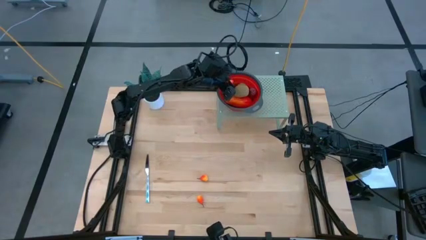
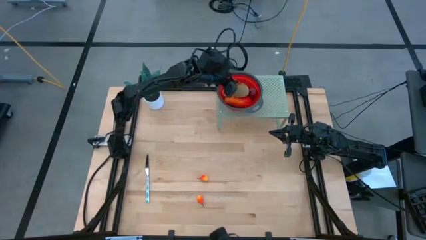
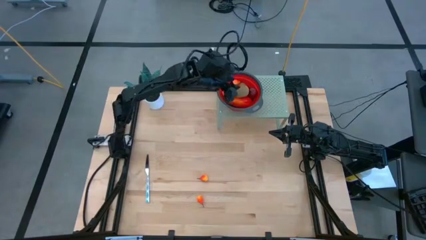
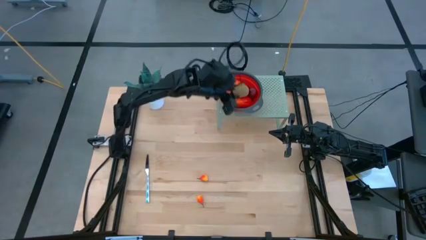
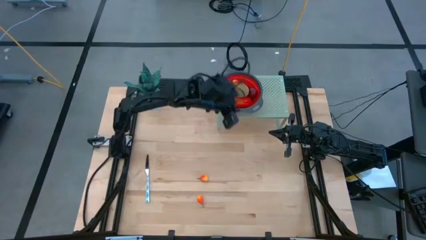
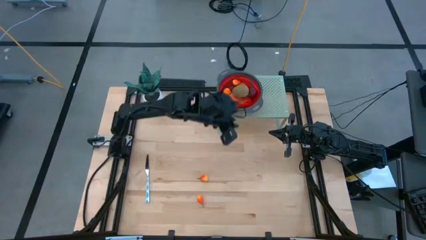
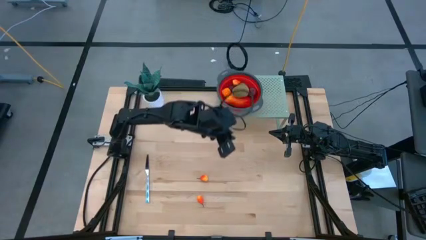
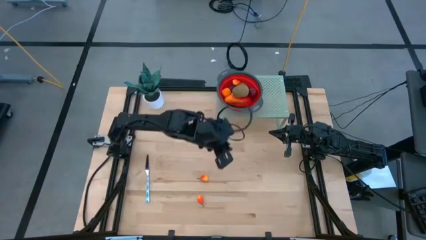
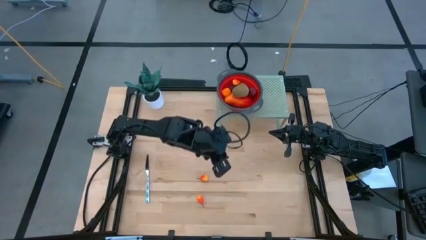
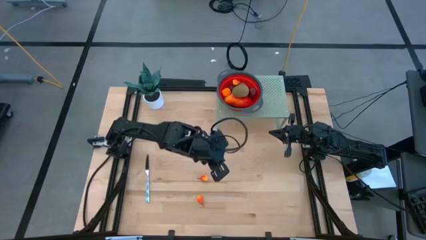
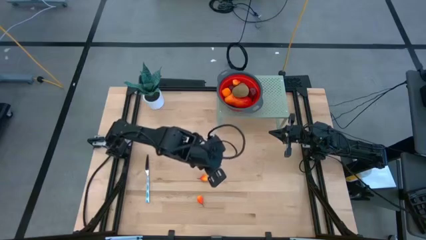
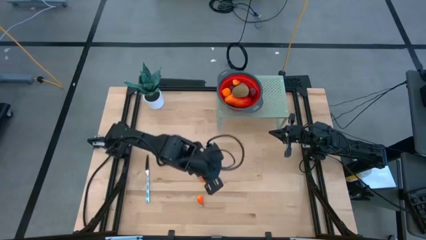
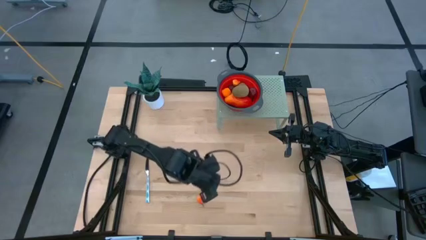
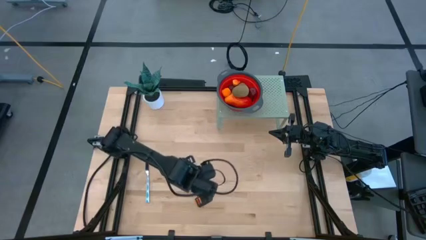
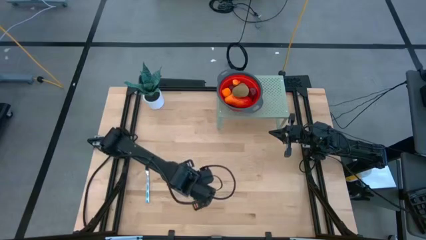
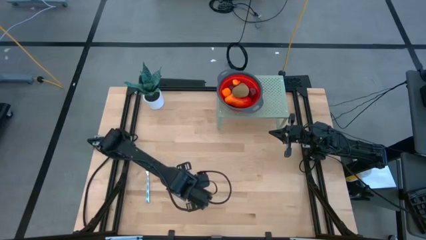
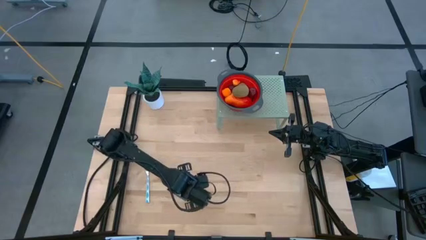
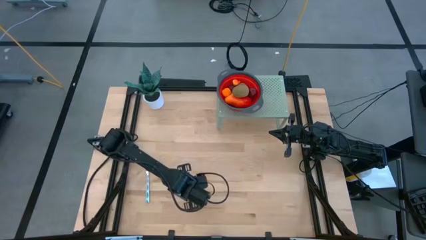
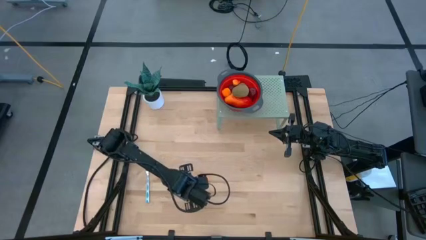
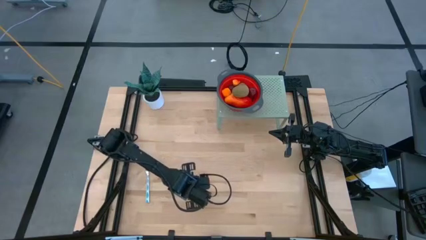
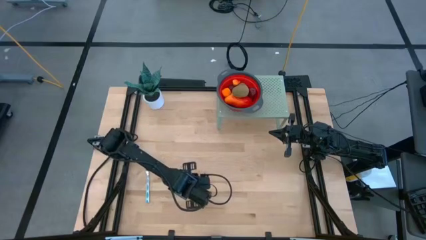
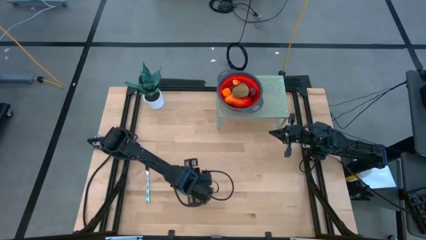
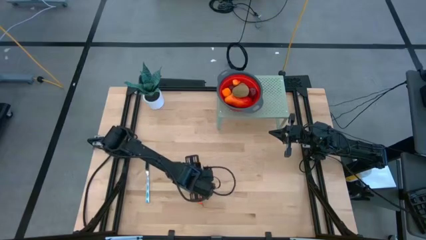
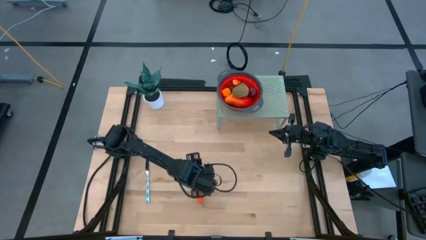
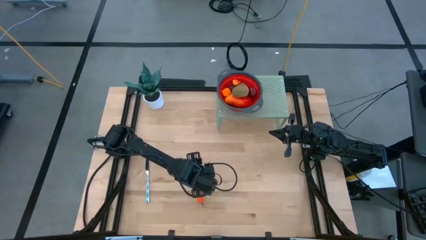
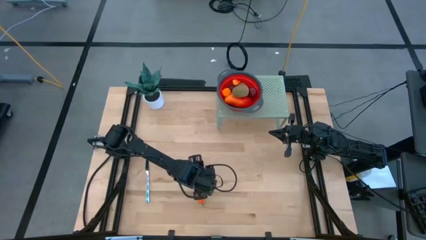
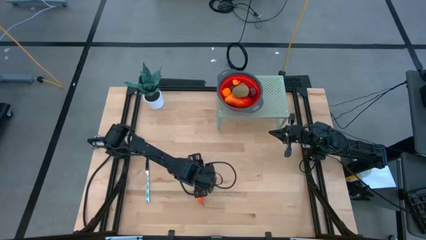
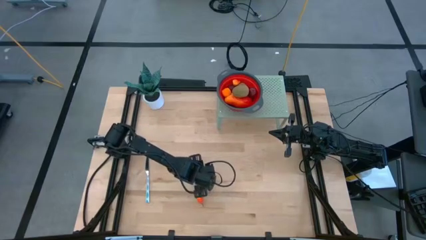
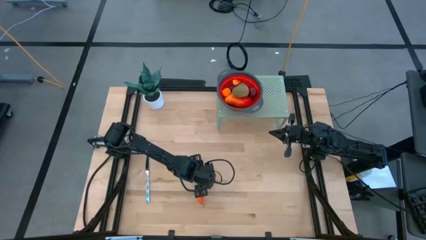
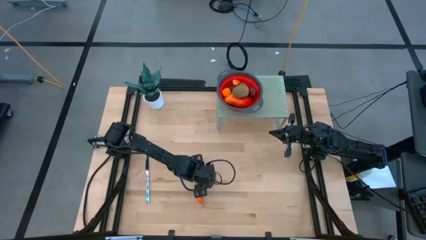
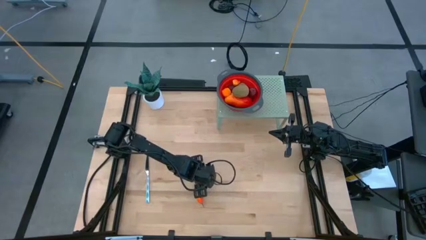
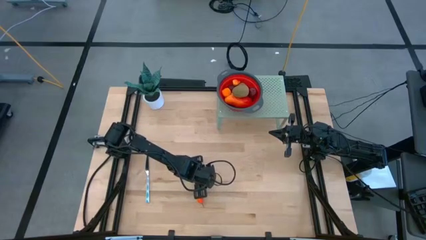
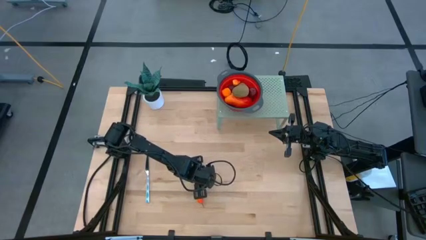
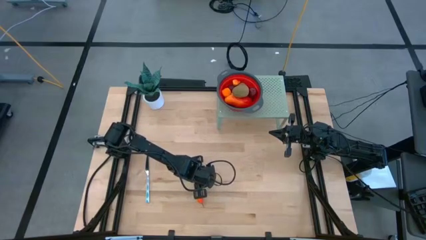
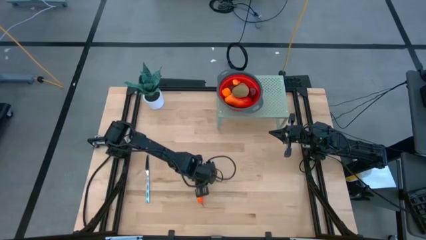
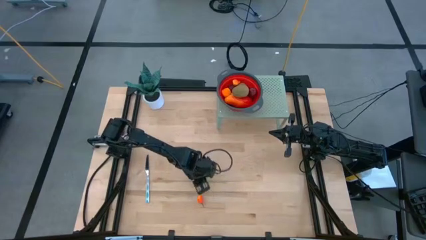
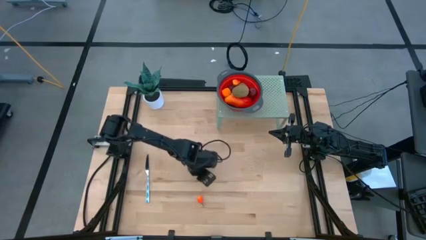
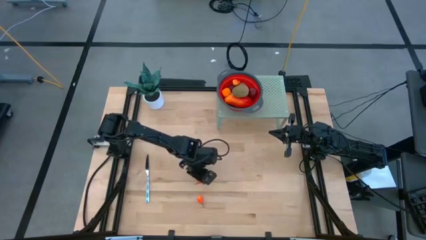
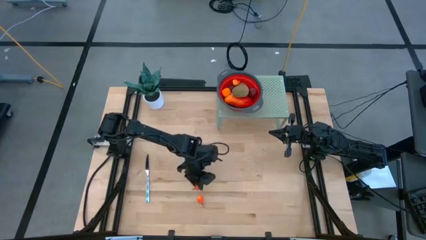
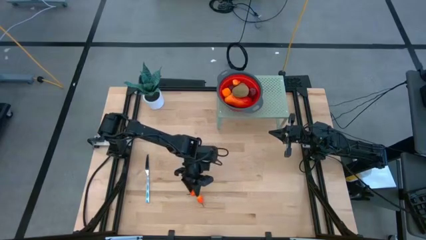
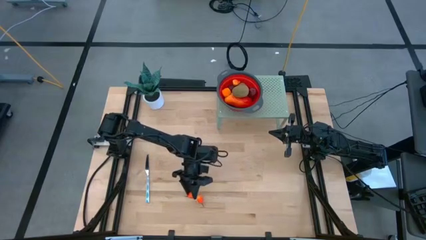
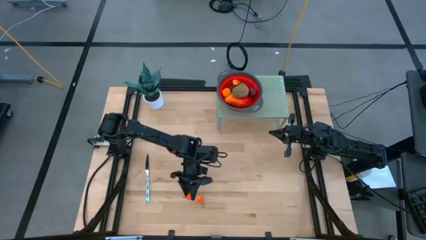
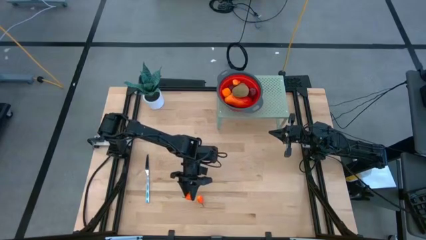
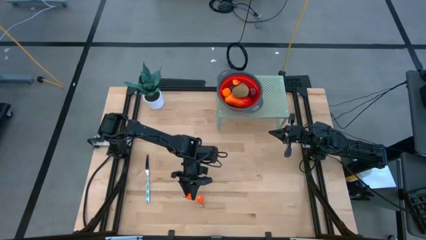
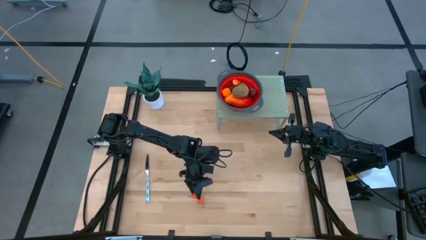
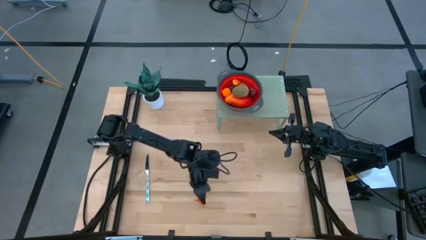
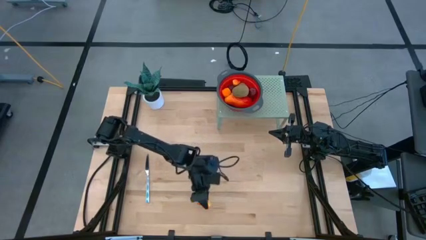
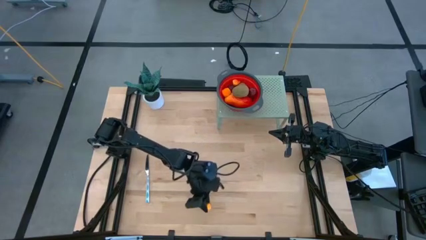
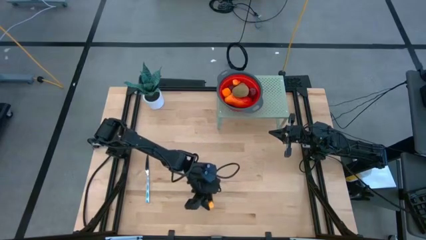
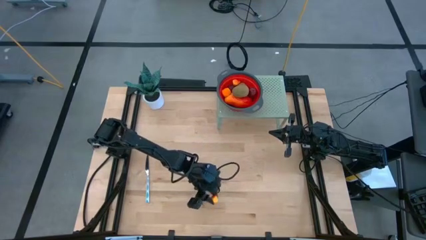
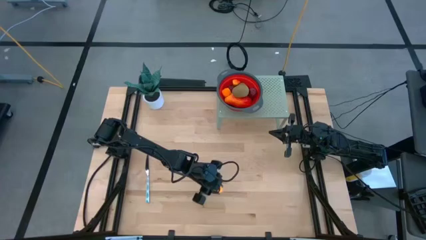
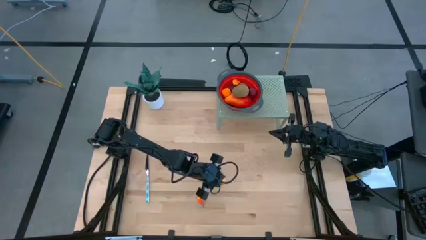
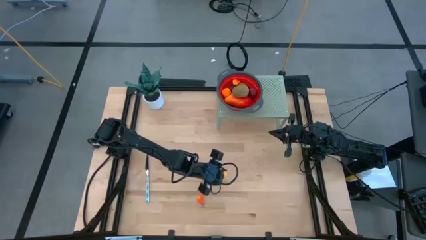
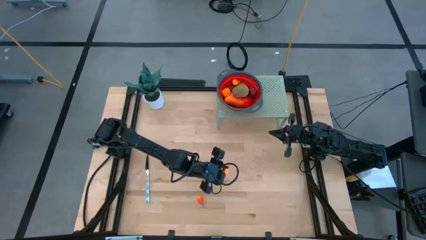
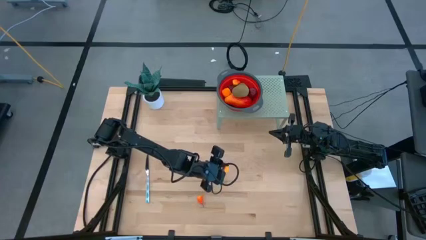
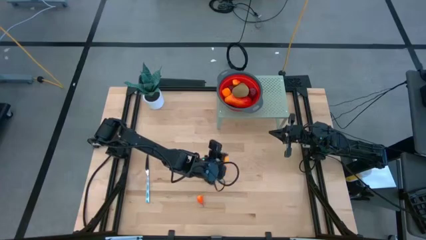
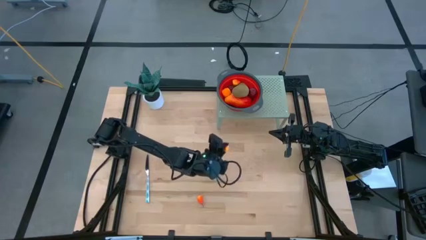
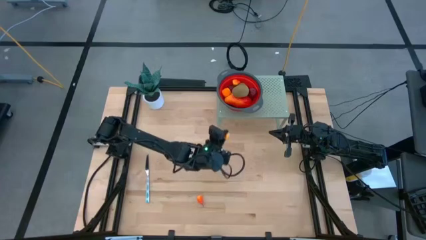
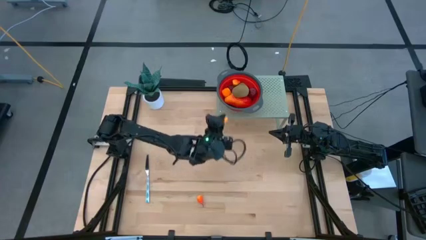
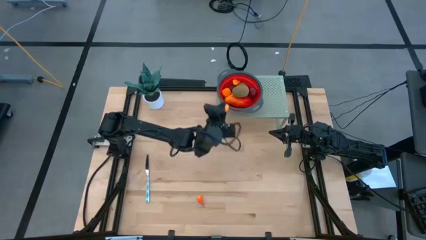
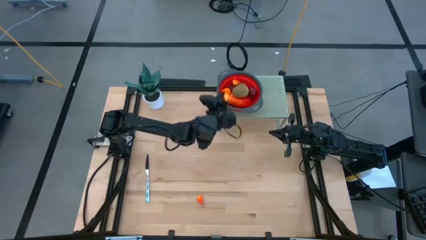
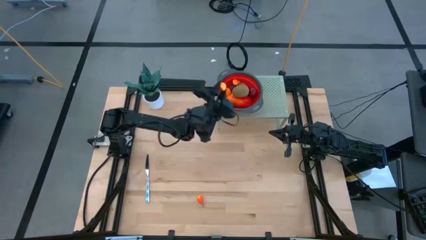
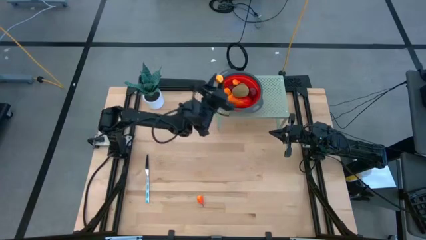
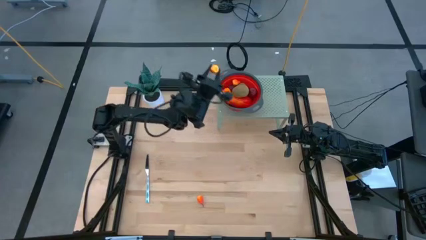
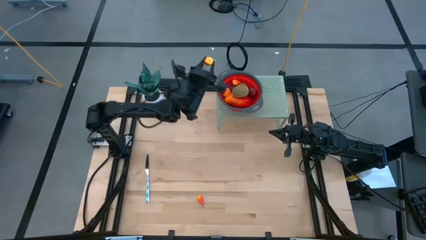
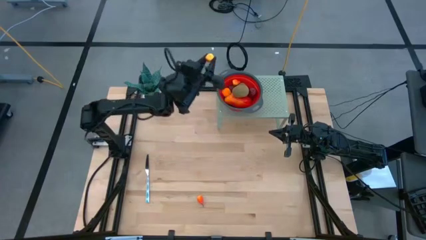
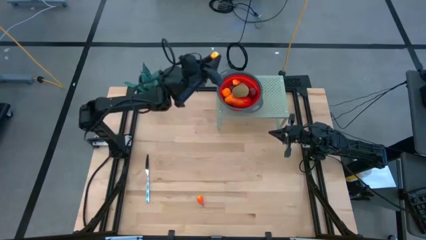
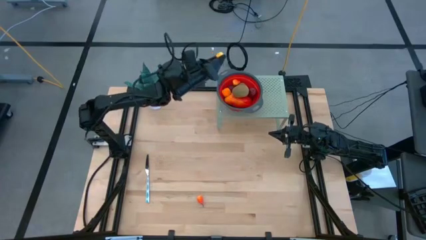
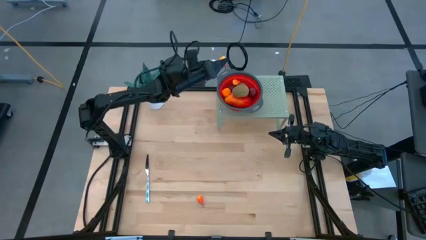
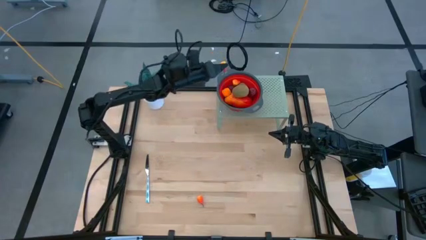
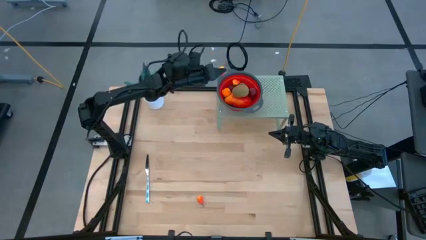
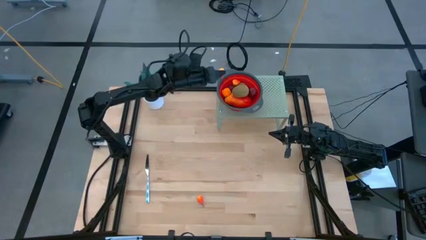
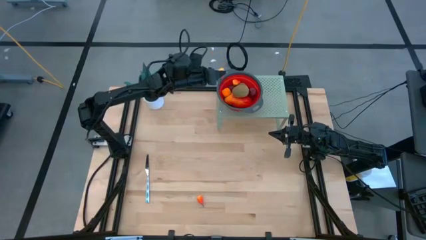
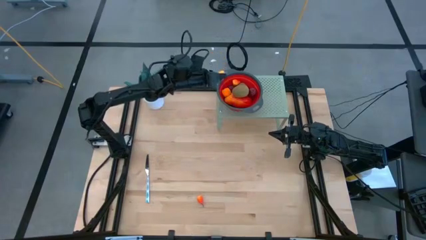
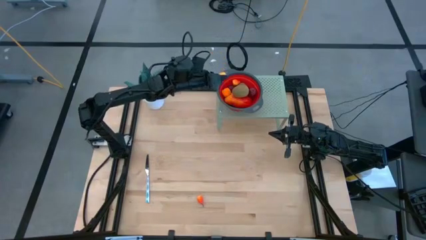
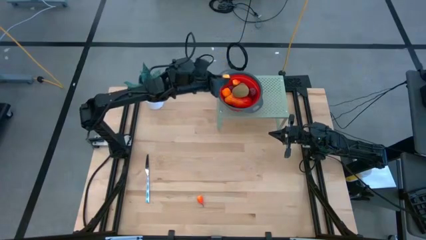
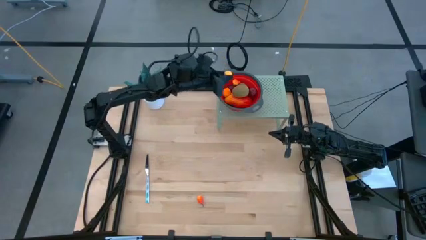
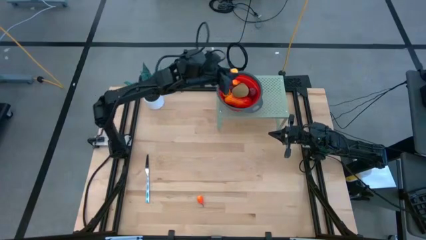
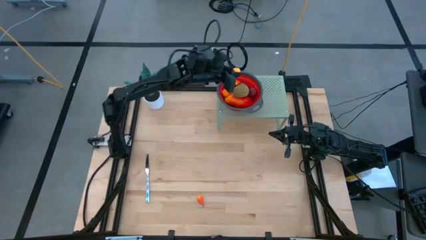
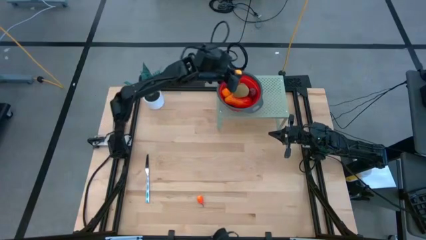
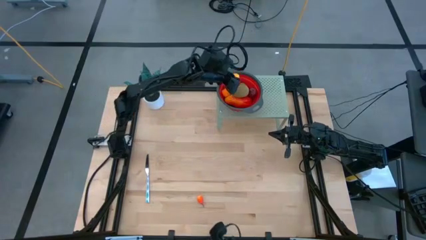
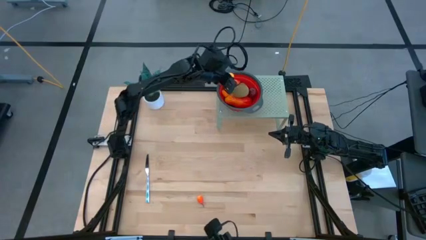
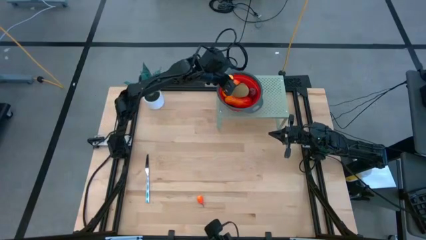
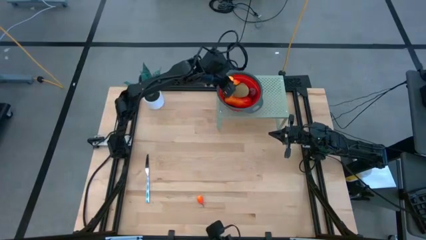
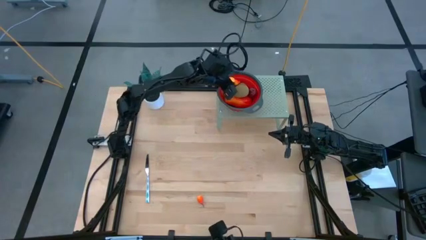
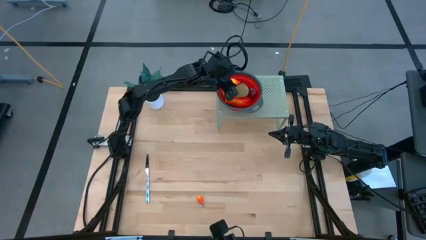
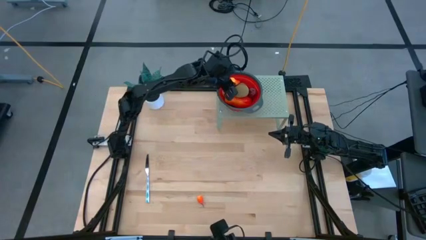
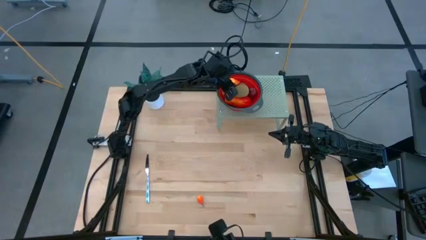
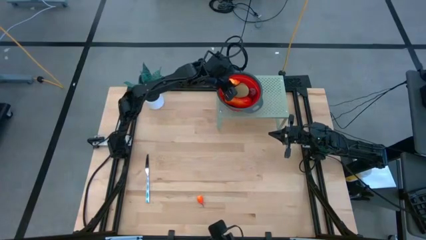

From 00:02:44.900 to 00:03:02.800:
Task: Pick & Place Fruit
Put the yellow peach into the red strainer bowl on the shelf
